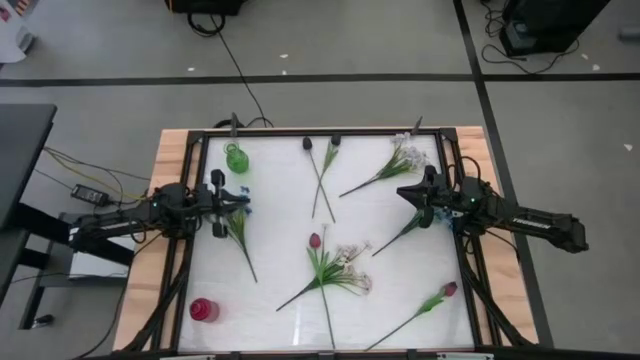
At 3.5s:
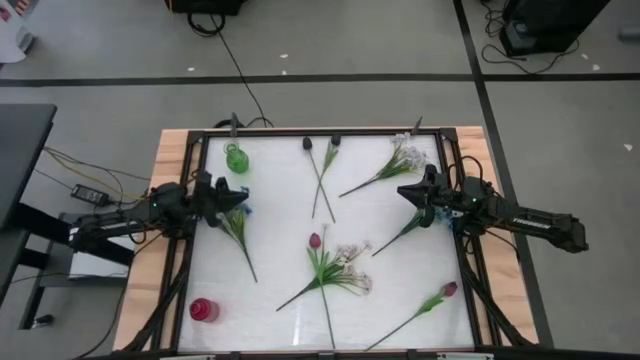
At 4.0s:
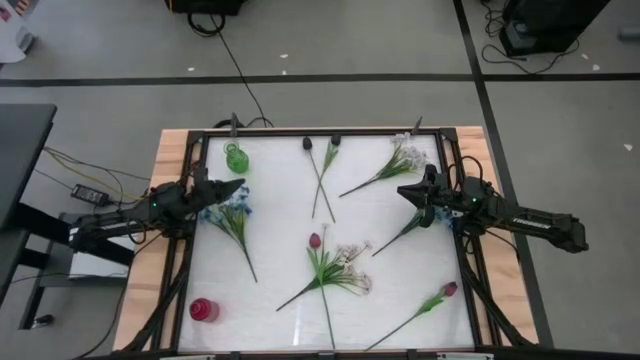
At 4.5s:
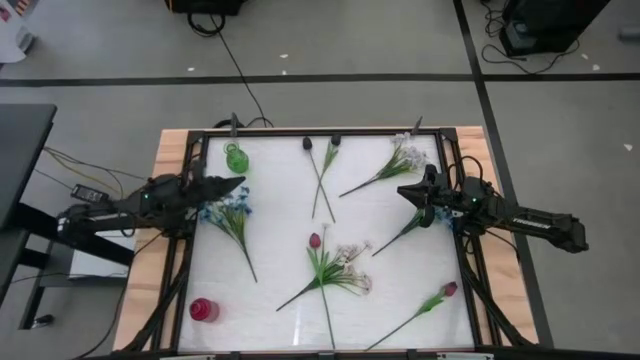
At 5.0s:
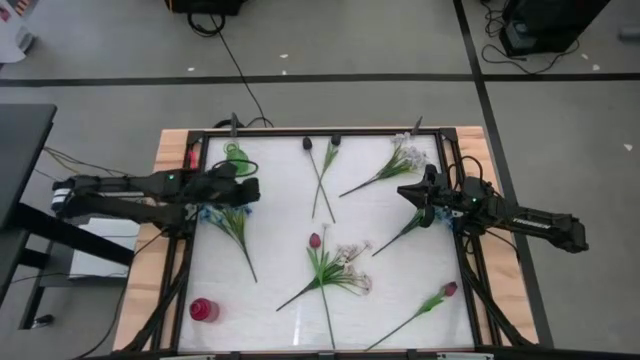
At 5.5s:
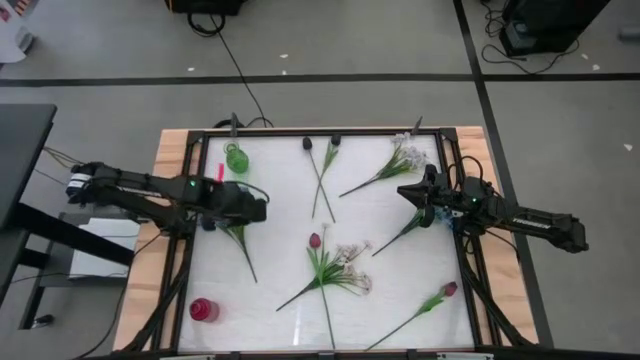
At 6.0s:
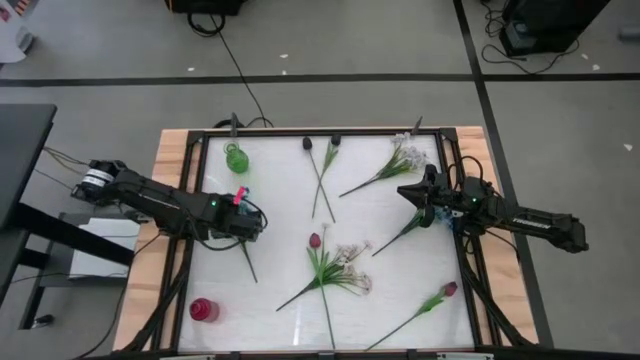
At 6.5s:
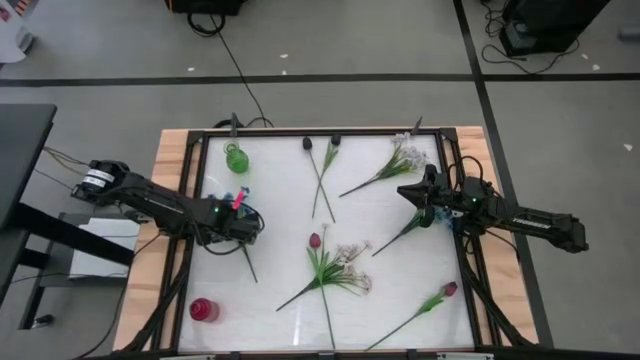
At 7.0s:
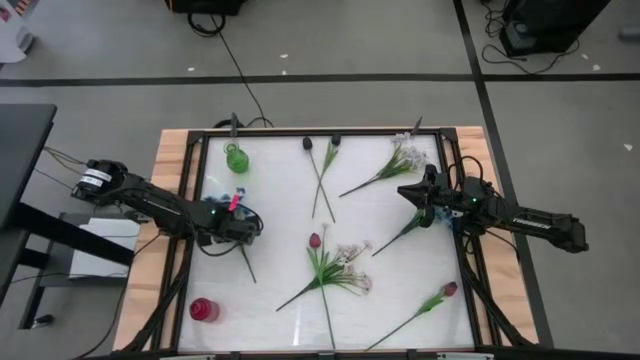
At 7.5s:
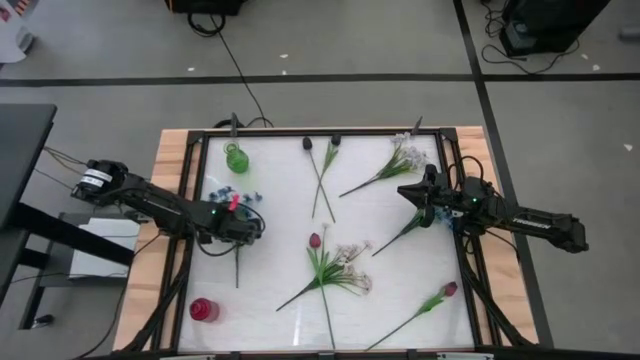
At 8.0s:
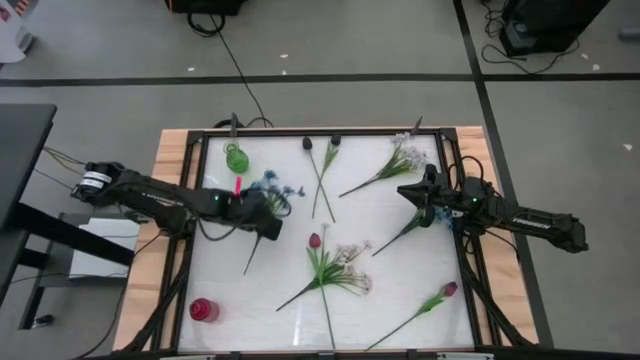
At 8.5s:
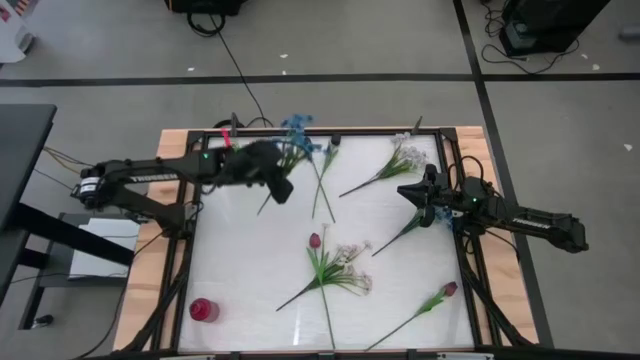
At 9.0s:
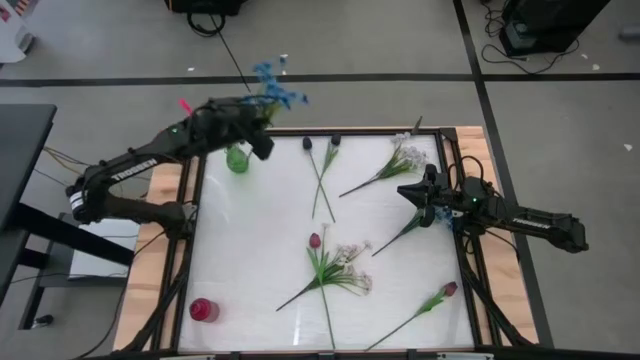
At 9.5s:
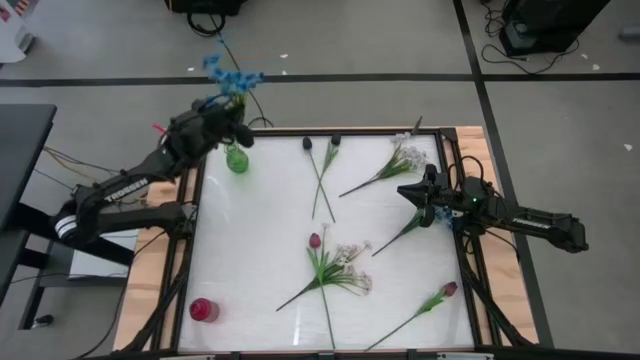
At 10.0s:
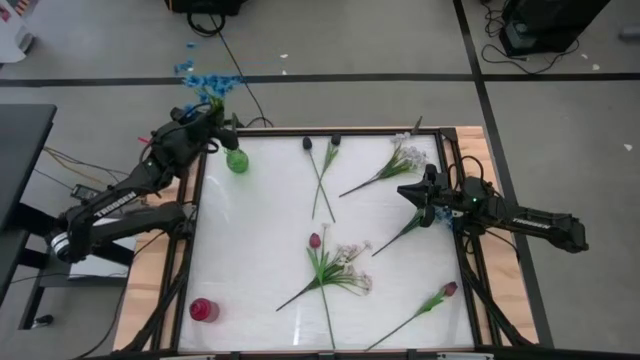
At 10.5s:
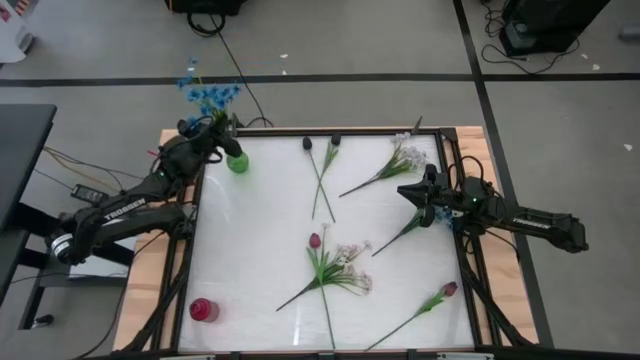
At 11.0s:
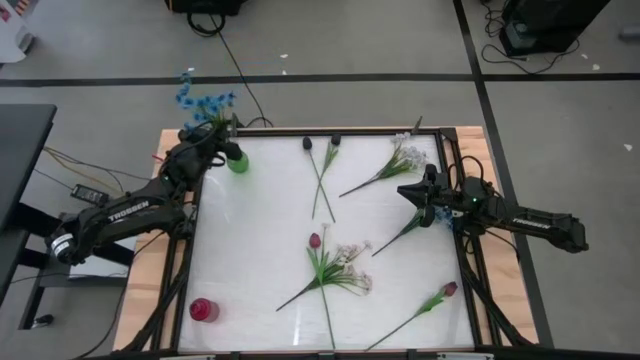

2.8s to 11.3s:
Task: Sort flowers into vase by color
Put the left blue flowers into the green vase

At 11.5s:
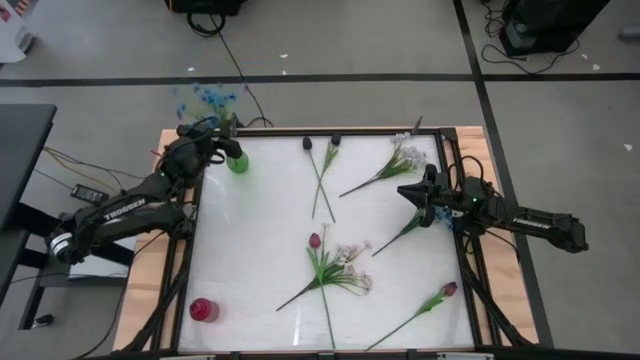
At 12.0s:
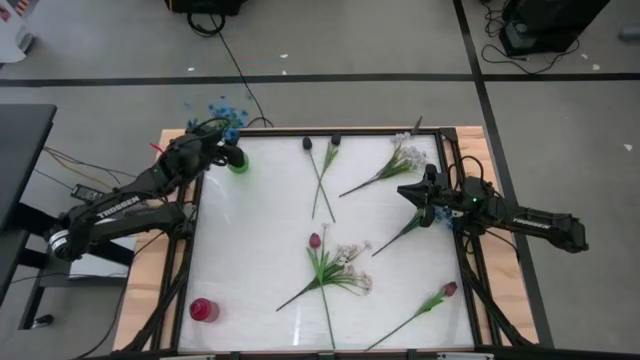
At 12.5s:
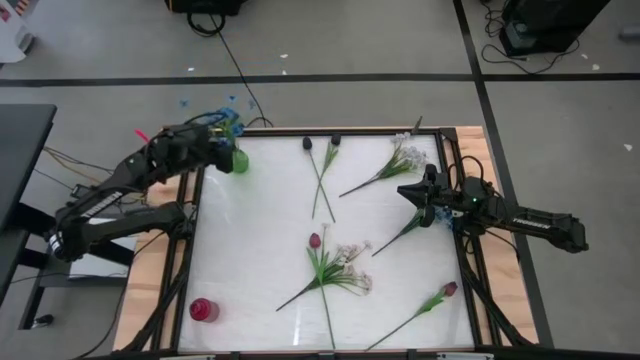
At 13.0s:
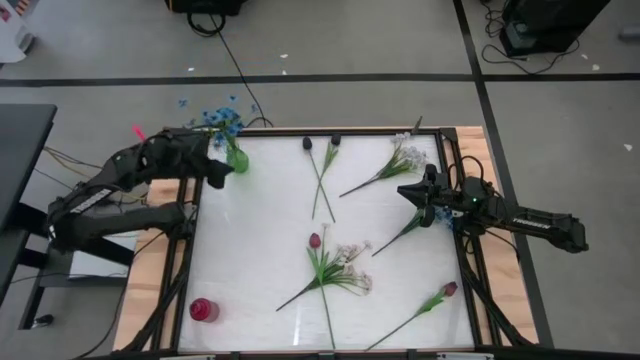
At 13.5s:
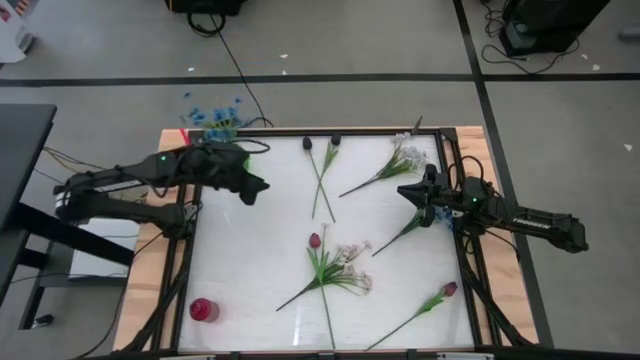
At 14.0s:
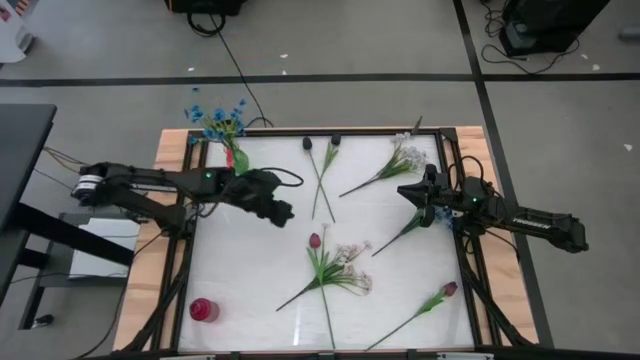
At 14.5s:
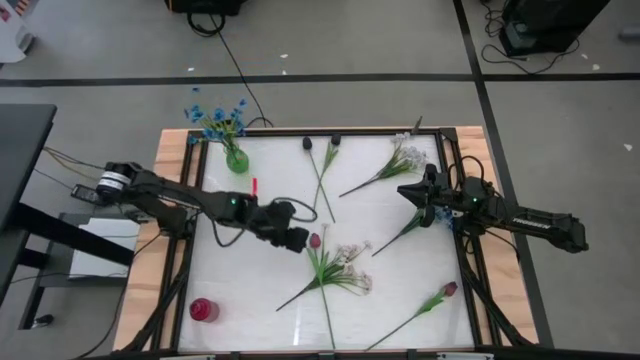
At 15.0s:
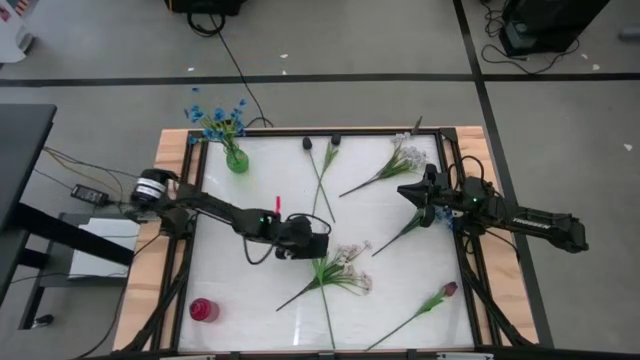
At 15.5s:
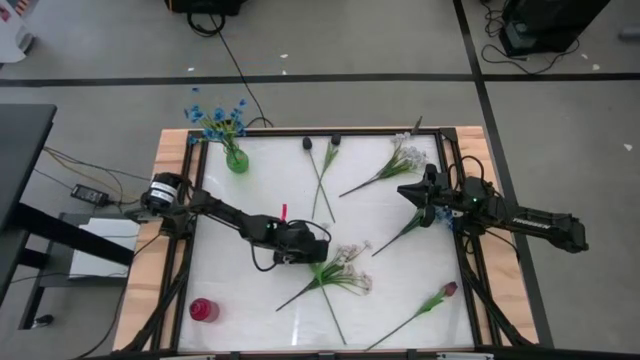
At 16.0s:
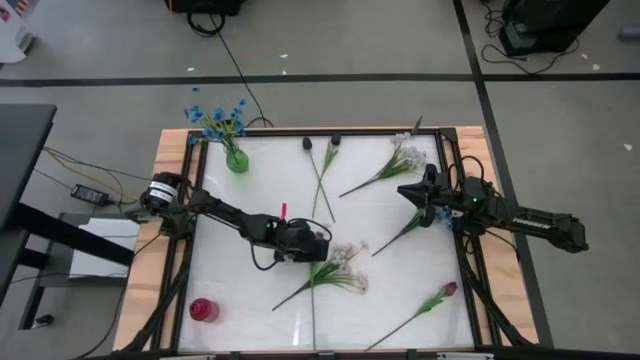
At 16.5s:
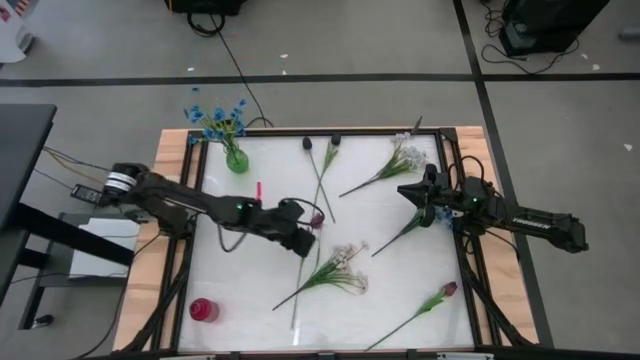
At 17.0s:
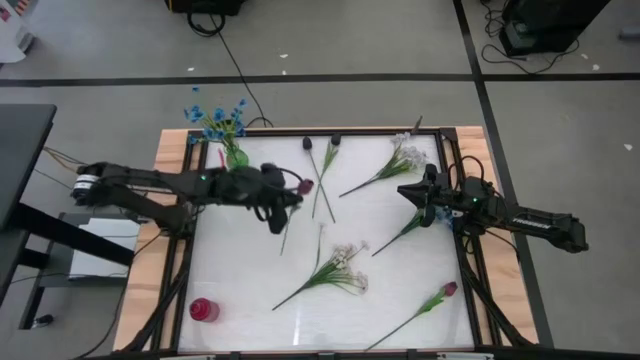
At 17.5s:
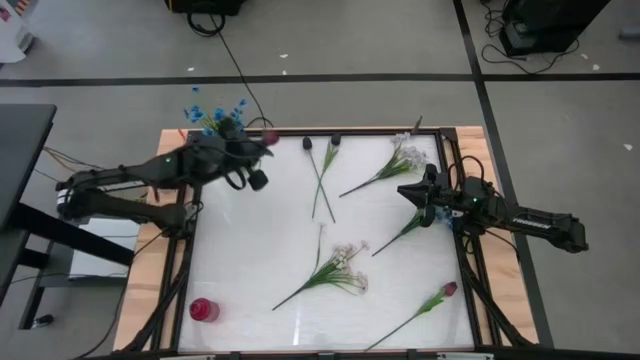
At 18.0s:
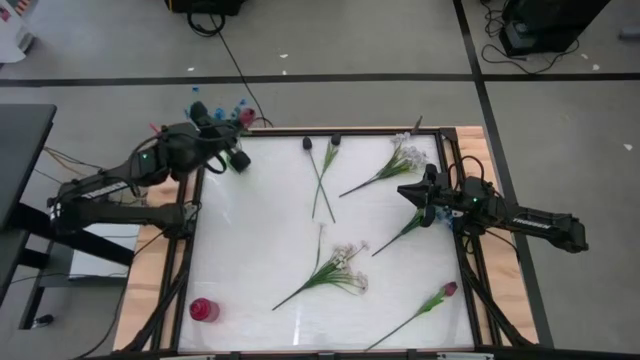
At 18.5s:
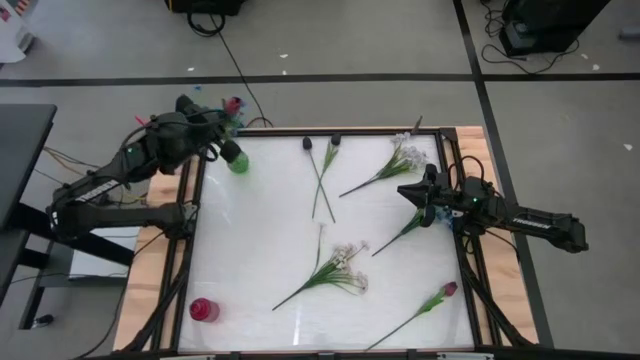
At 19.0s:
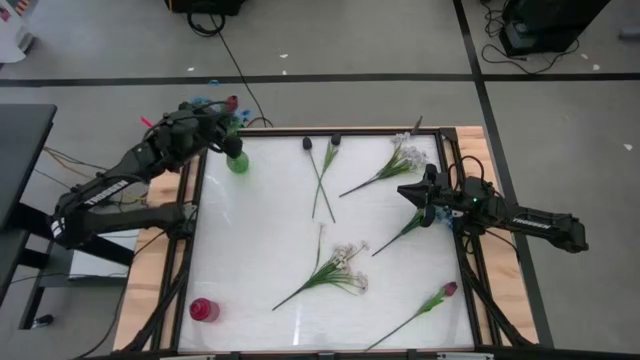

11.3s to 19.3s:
Put the left pink flower into the green vase

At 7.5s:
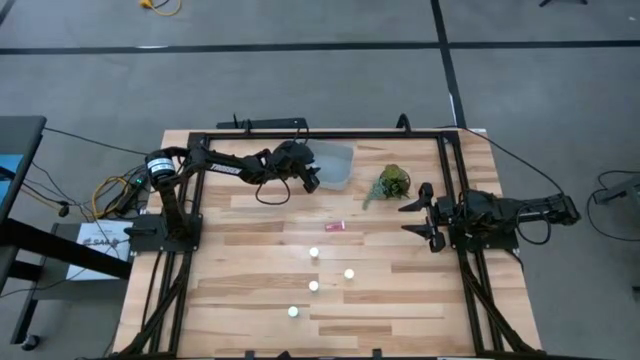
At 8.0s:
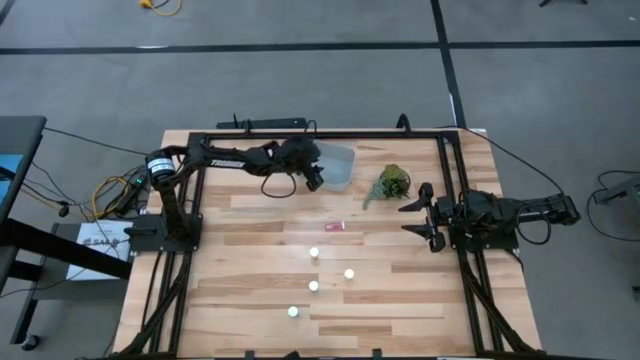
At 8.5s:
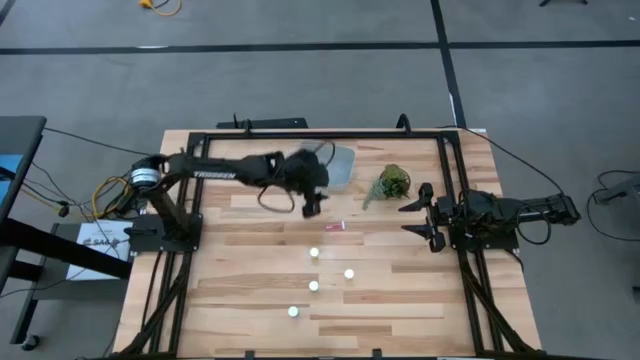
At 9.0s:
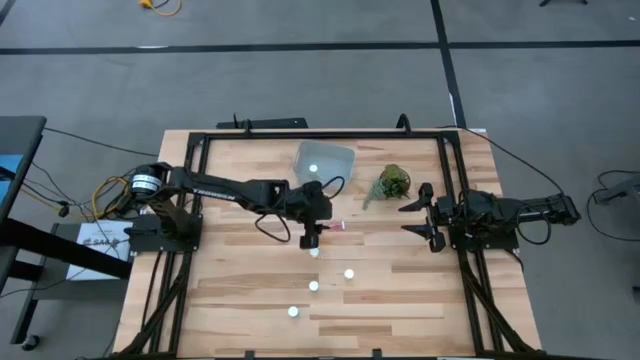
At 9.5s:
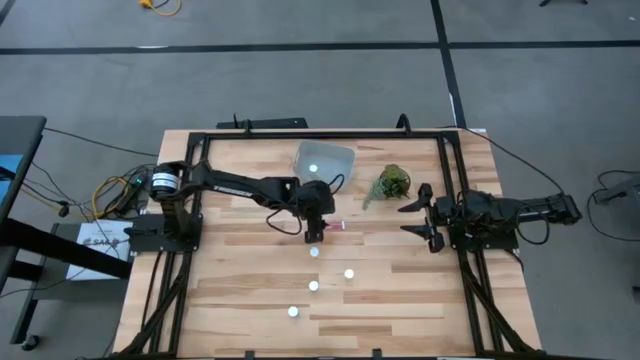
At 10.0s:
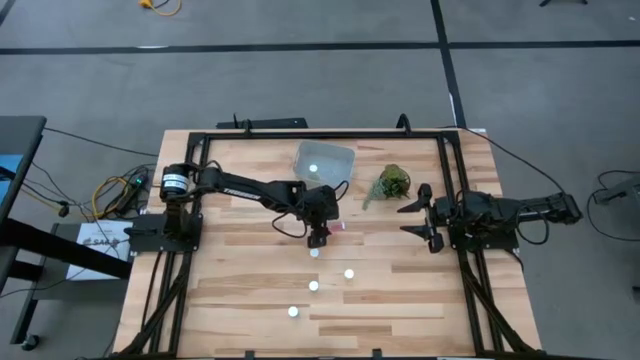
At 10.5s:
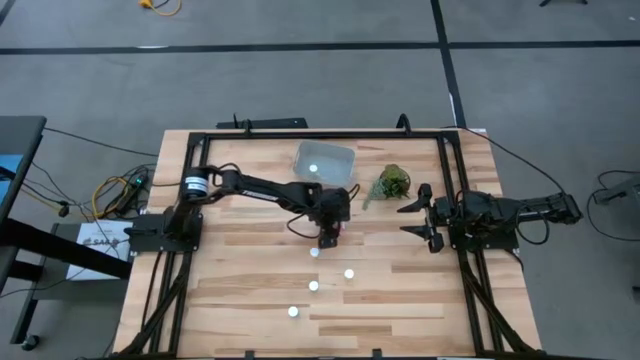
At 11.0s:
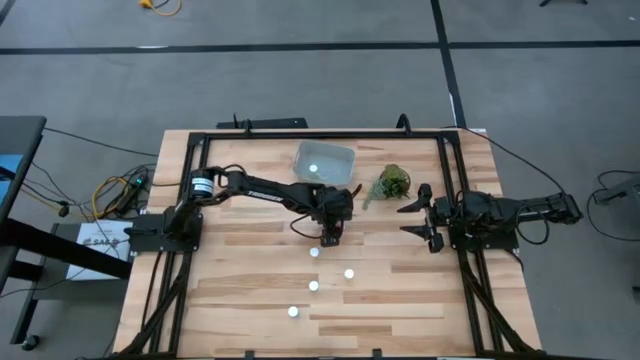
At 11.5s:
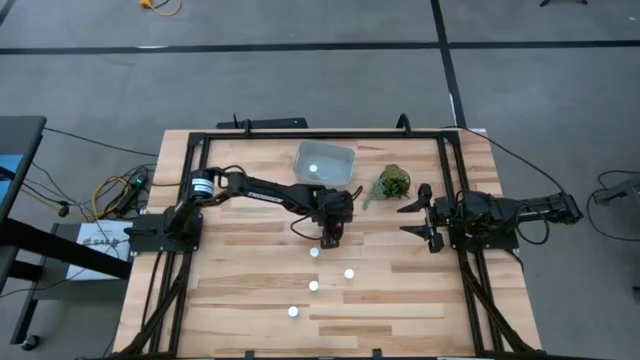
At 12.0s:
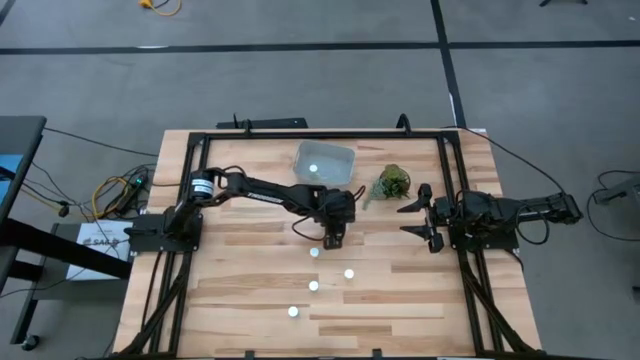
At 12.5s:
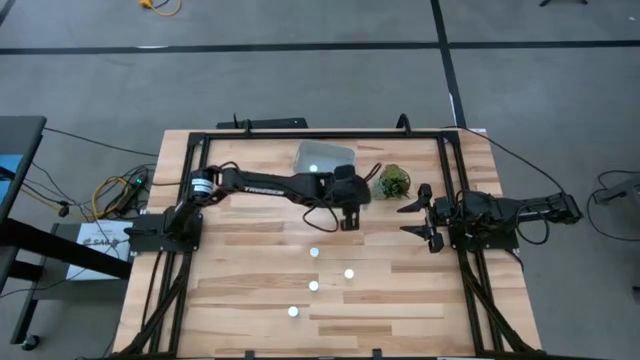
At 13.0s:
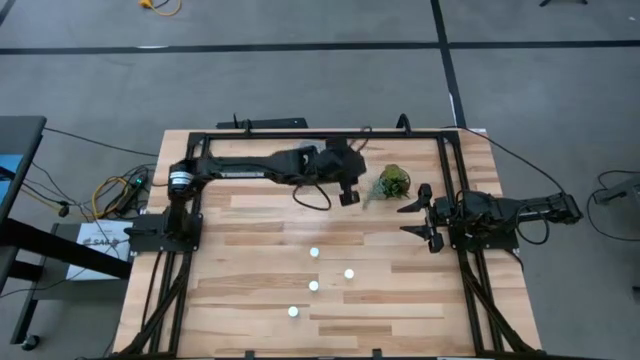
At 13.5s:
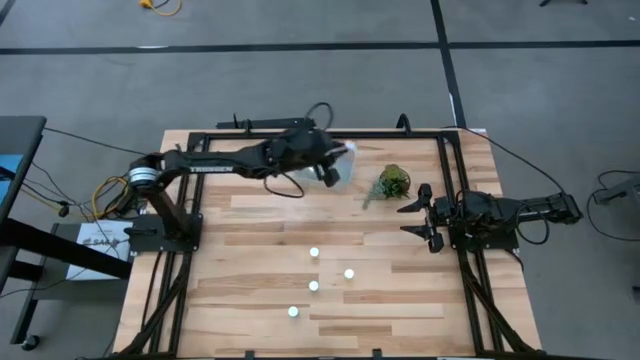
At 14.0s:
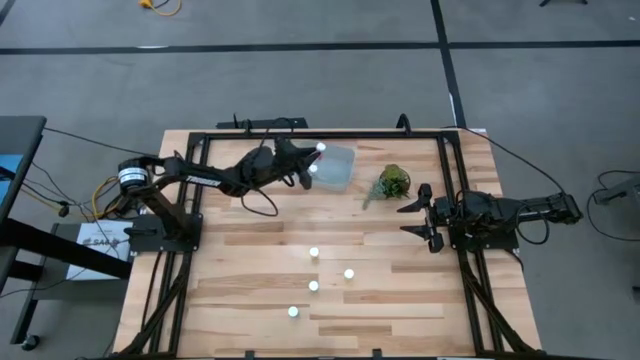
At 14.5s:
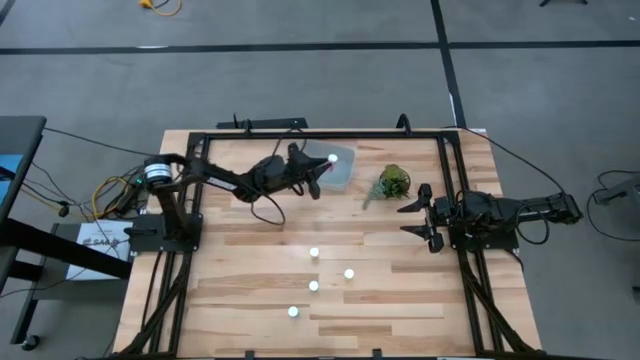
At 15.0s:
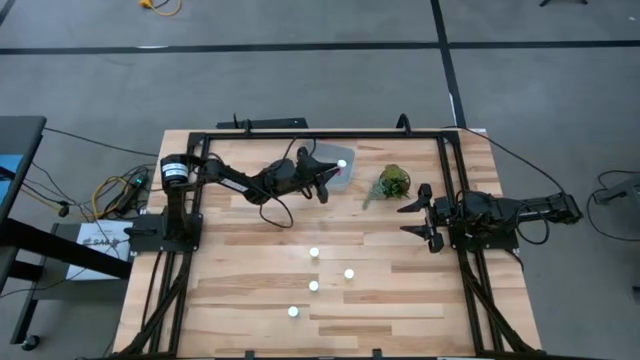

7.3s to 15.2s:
Task: Pick and place pill bottles into a basket
Put the pink pill bottle into the gray bin
